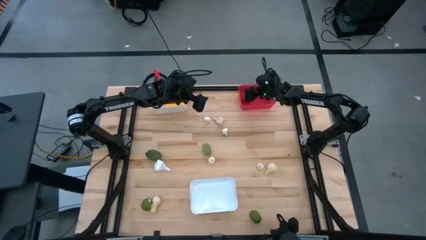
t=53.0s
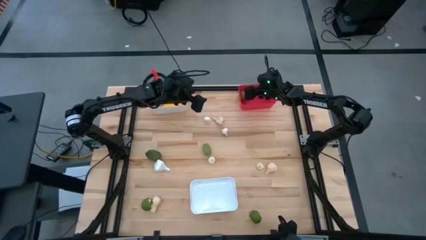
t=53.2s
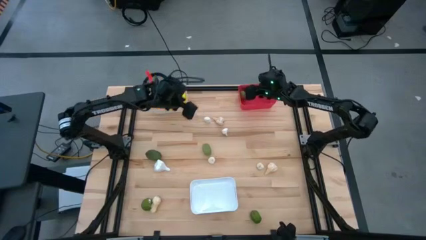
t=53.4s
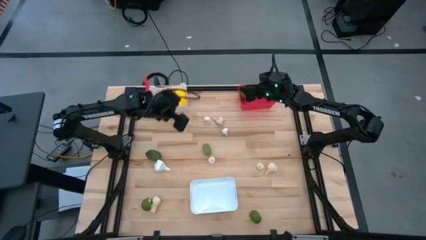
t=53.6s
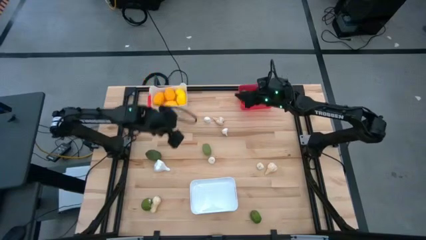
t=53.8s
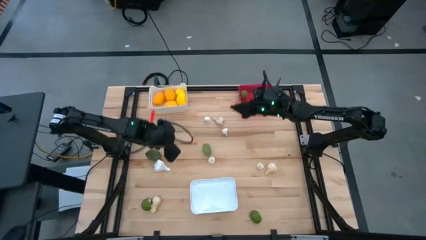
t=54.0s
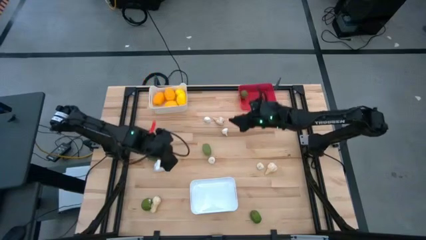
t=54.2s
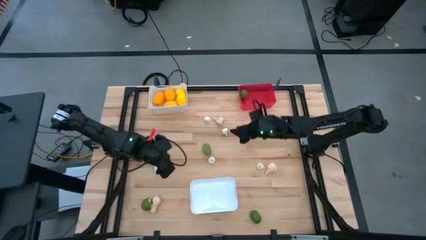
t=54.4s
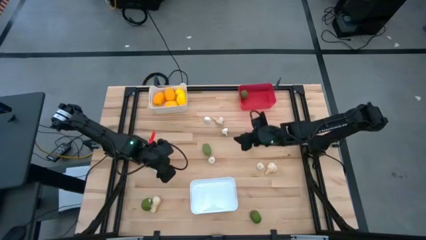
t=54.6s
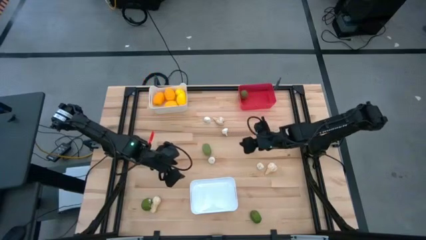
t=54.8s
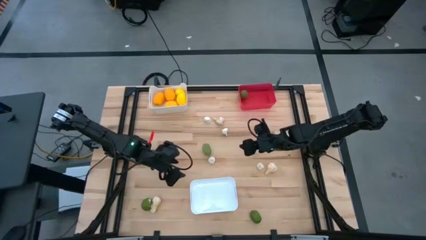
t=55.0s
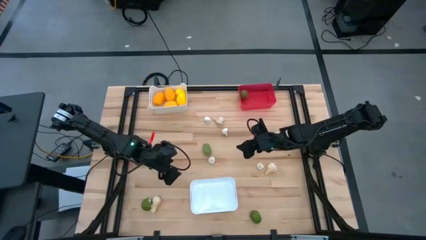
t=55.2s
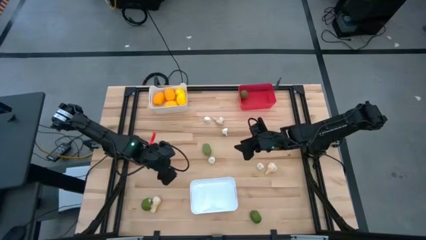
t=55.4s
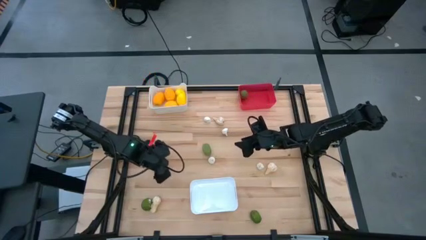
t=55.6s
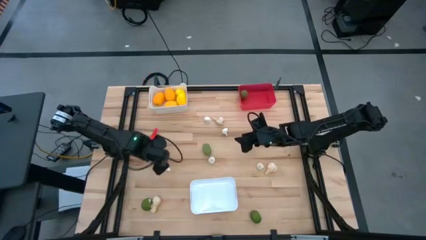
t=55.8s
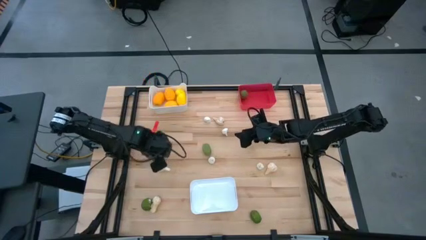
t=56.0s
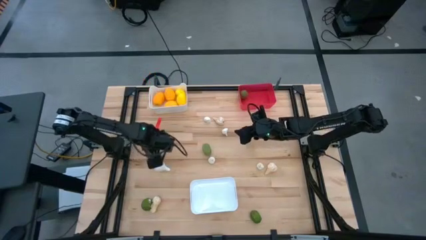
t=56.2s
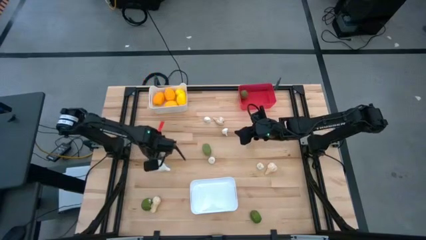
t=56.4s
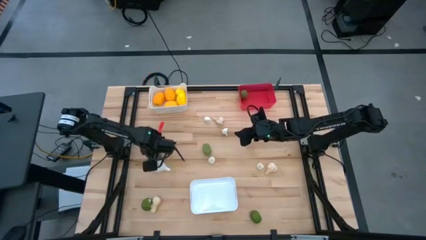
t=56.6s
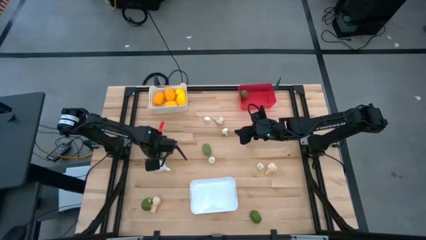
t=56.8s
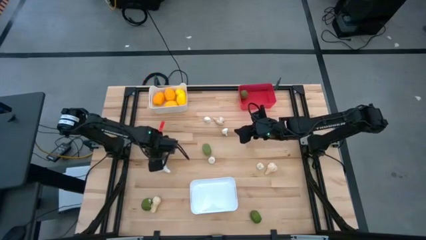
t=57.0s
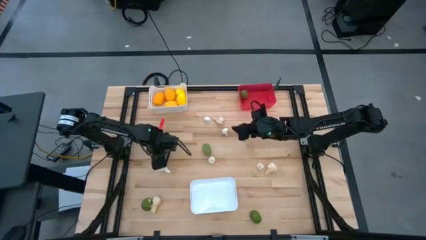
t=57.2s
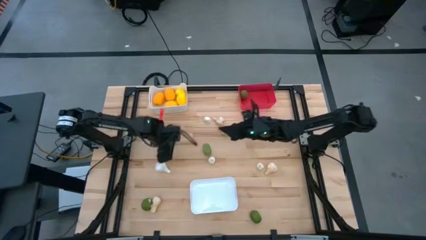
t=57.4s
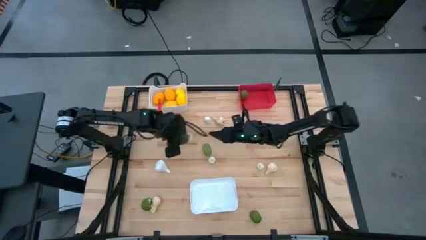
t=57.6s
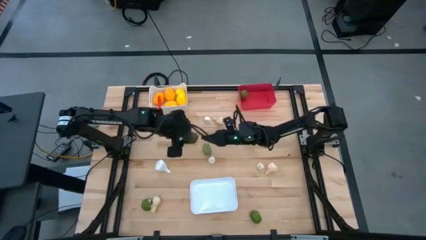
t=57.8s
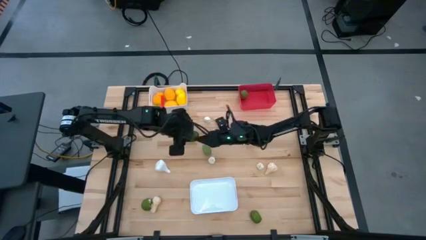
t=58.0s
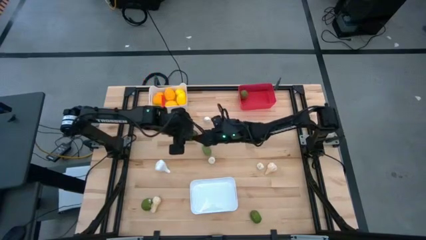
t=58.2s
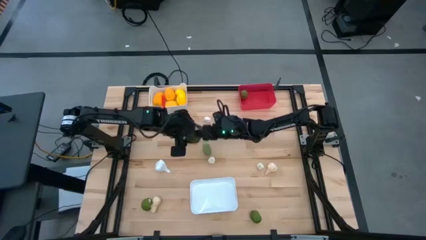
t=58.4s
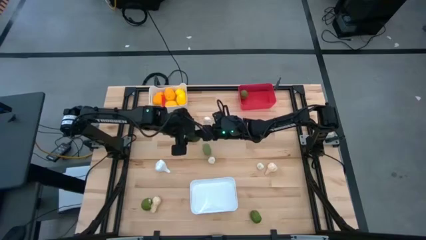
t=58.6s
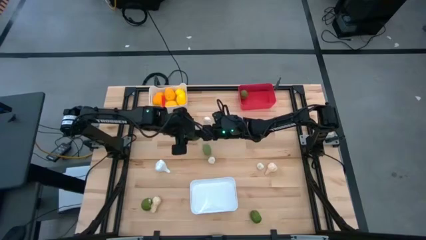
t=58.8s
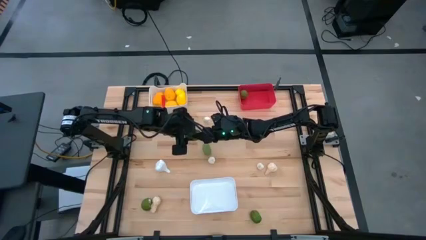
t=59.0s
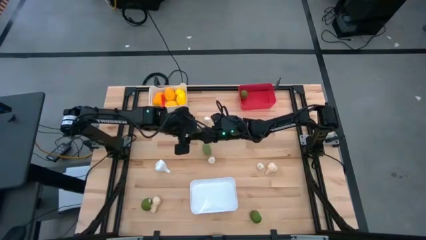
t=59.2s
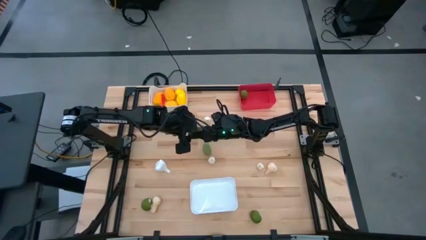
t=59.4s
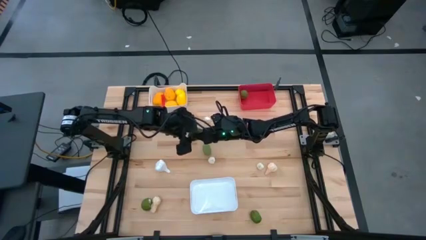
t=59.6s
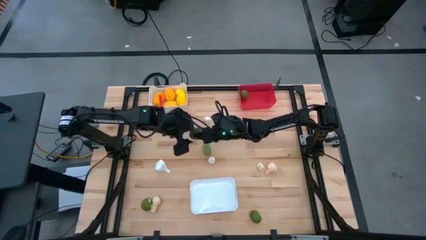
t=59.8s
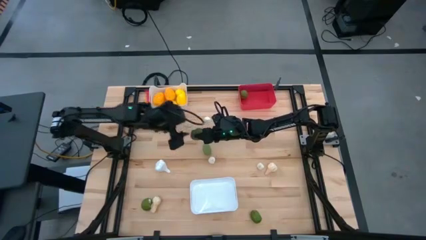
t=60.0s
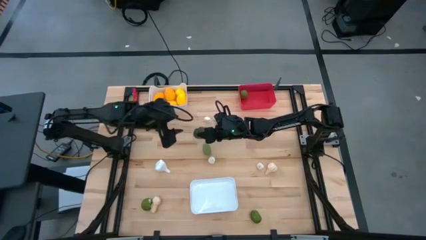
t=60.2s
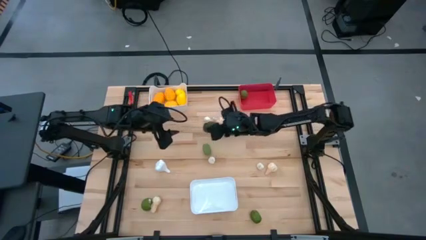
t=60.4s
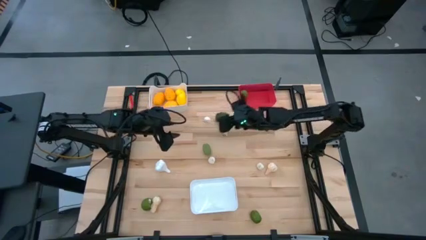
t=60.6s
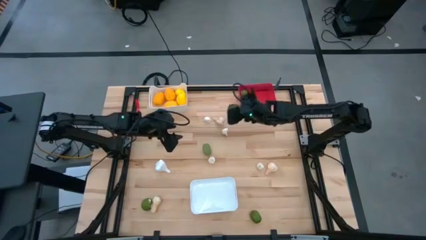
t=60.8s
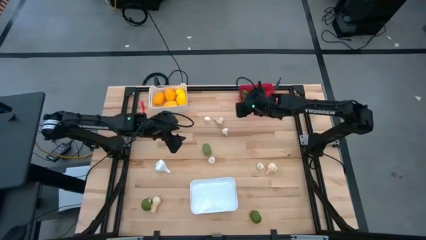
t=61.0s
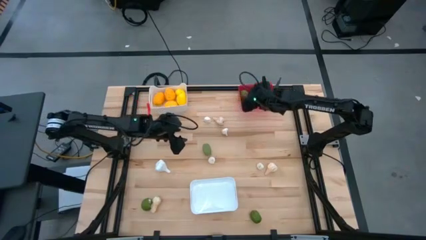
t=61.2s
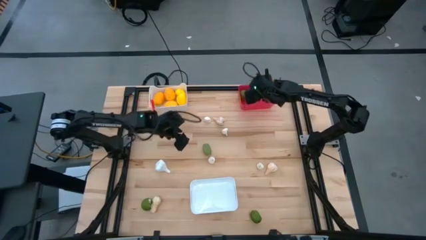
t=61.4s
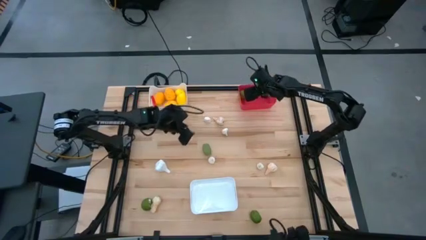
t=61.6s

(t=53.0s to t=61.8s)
Task: Sort produce into baskets
Put the green lime into the red bin

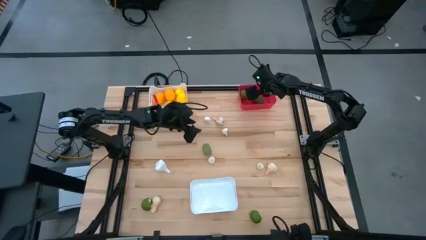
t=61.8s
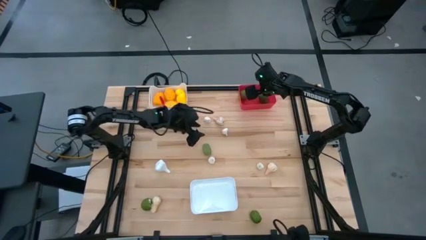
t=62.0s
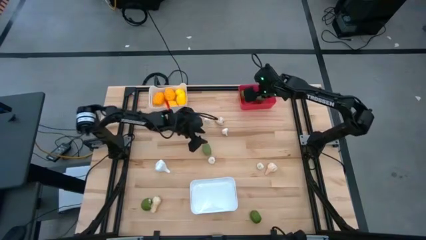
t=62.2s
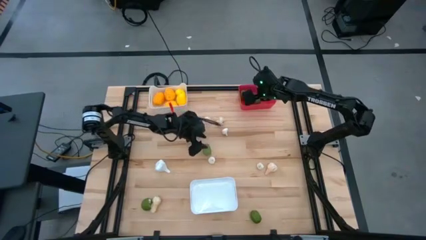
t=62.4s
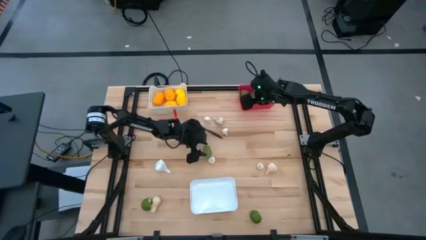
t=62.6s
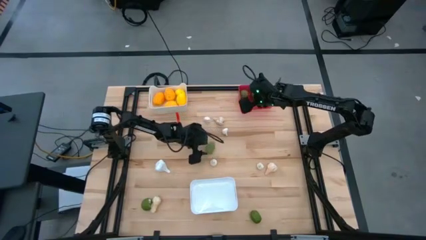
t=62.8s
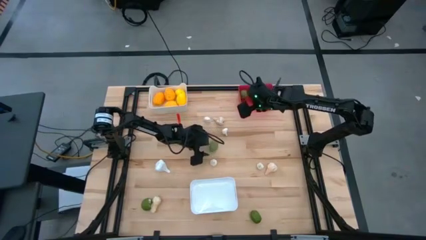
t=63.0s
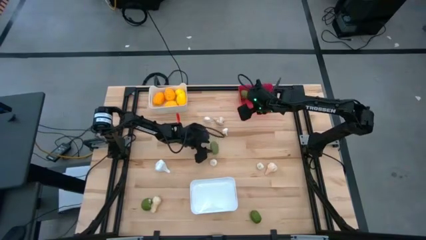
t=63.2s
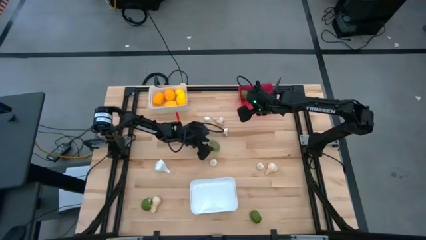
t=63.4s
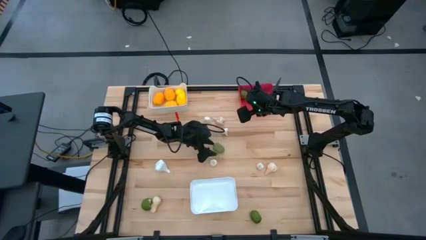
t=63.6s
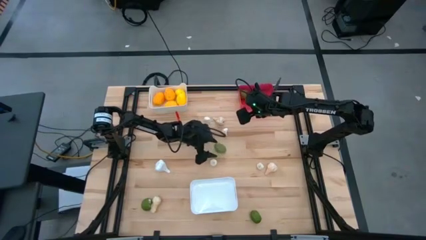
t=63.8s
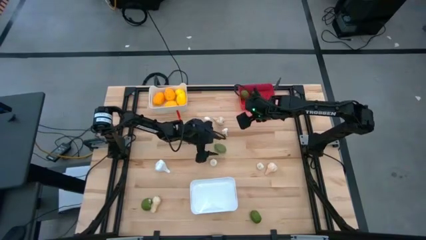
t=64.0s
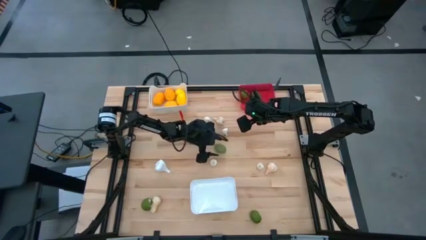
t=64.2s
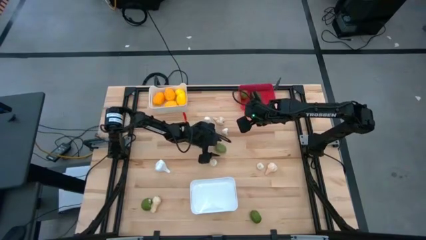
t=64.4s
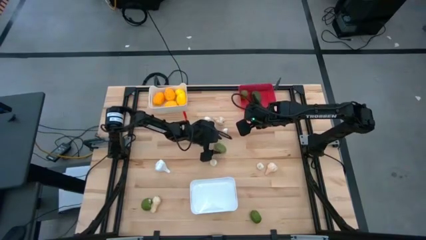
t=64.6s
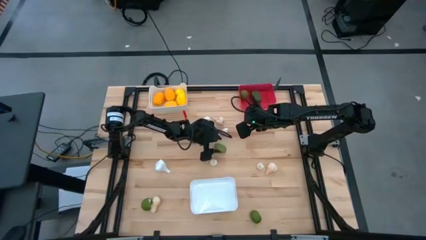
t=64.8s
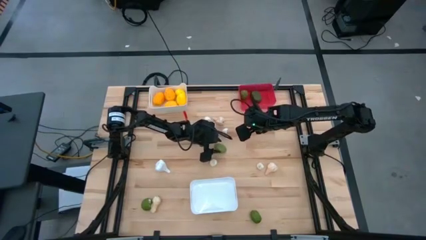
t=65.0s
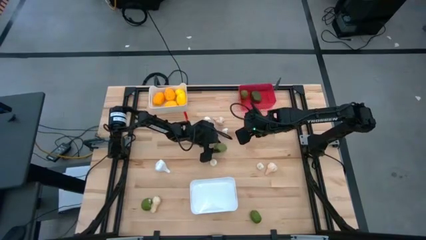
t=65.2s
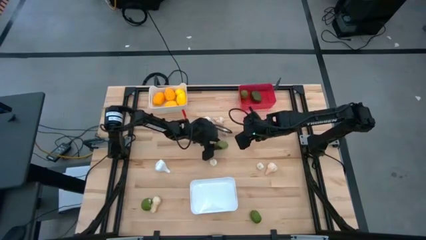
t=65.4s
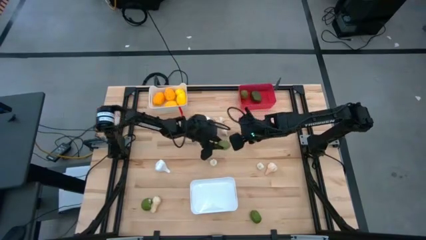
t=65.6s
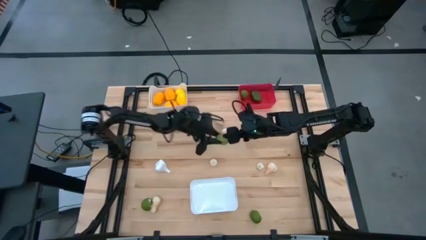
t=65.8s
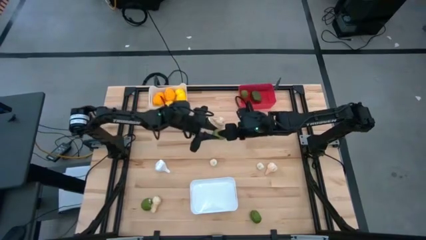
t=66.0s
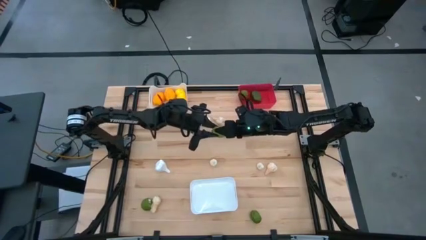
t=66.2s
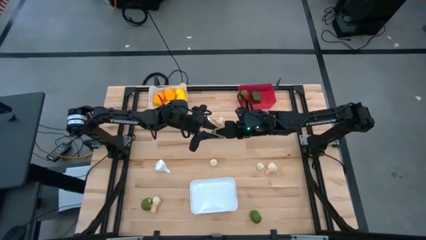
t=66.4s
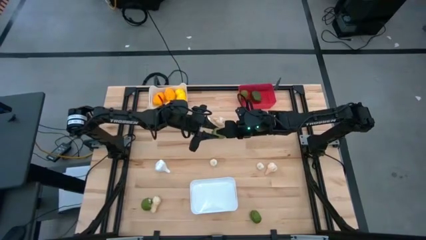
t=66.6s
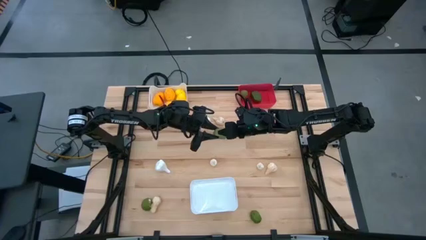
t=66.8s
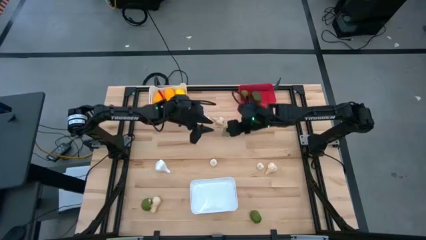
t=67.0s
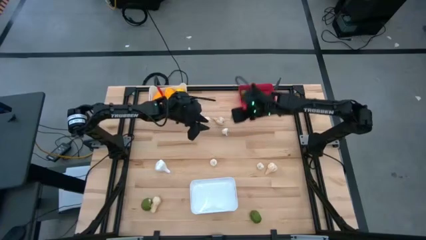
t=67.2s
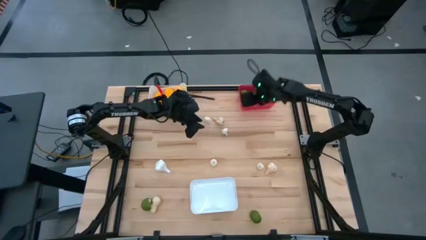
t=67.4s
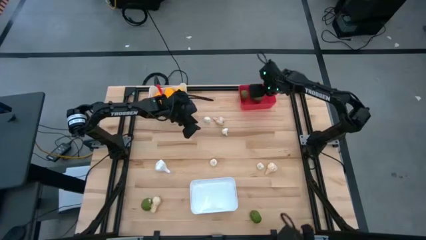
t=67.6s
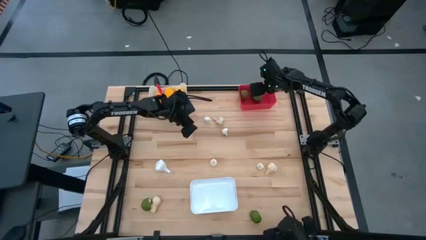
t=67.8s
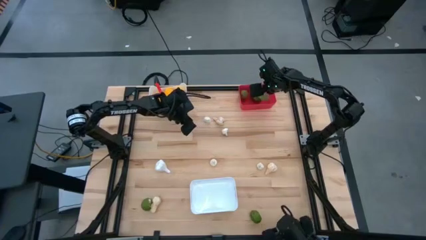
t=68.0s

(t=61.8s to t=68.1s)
Put the green lime into the red bin

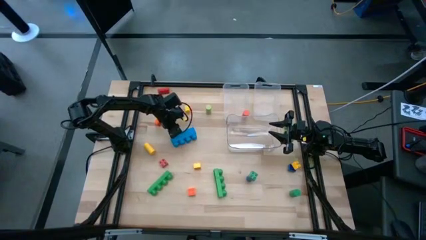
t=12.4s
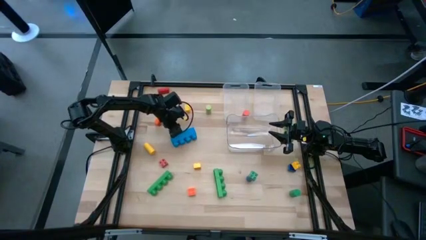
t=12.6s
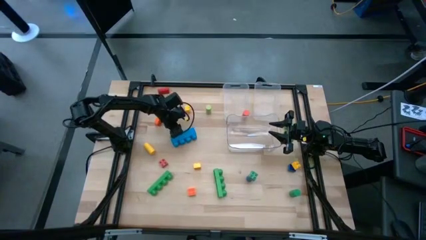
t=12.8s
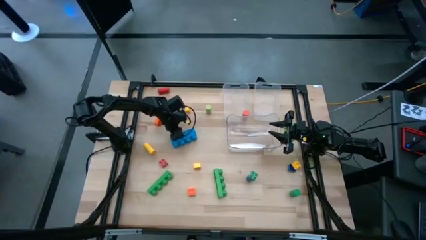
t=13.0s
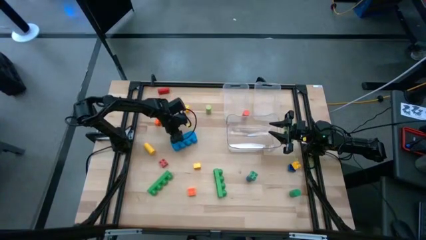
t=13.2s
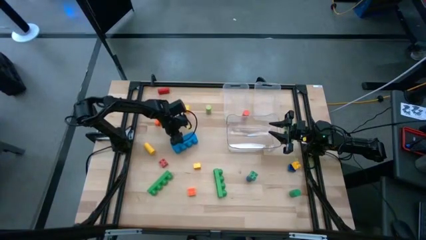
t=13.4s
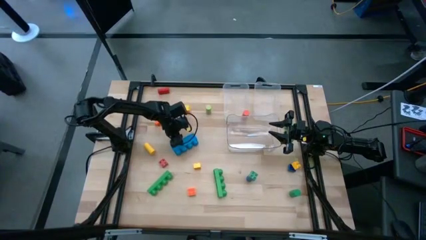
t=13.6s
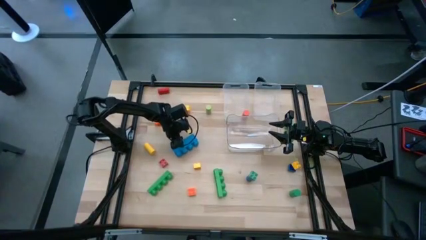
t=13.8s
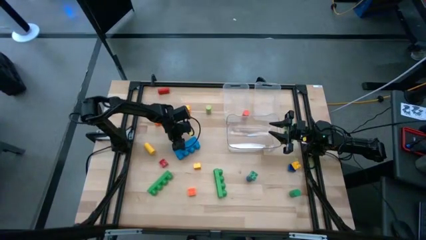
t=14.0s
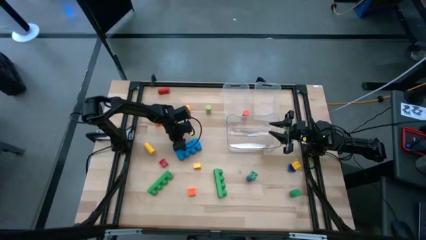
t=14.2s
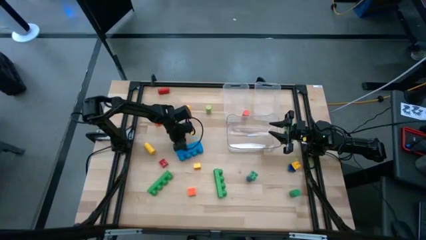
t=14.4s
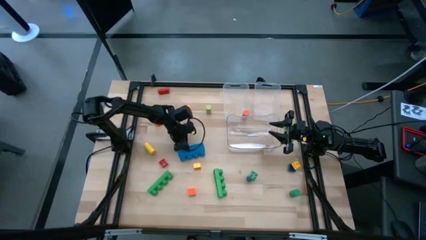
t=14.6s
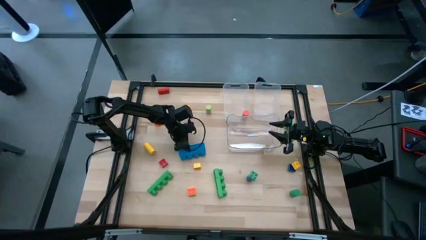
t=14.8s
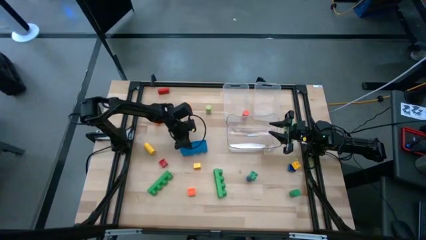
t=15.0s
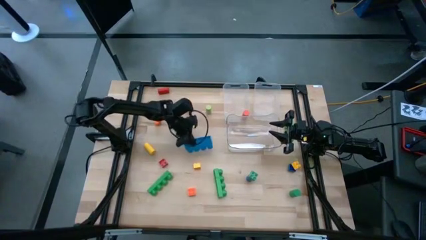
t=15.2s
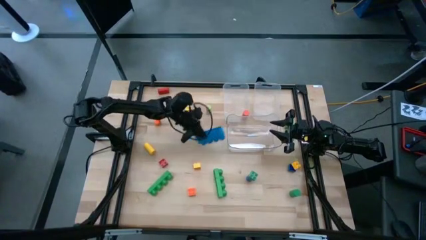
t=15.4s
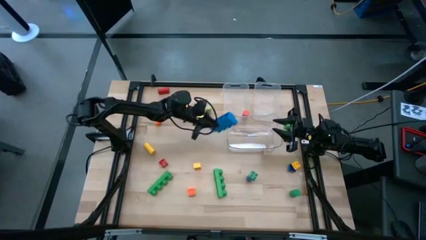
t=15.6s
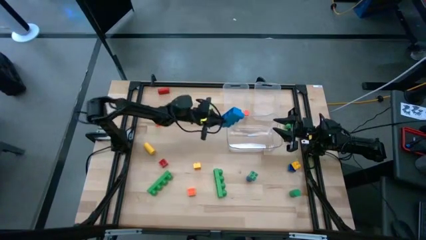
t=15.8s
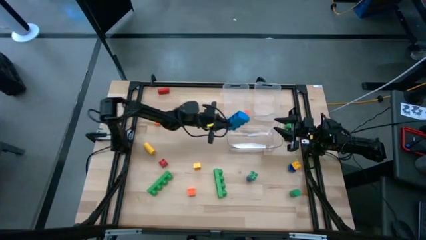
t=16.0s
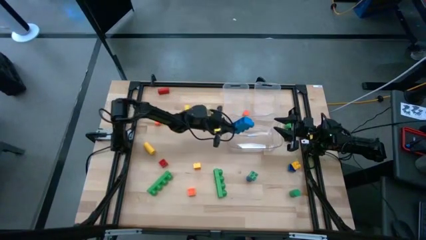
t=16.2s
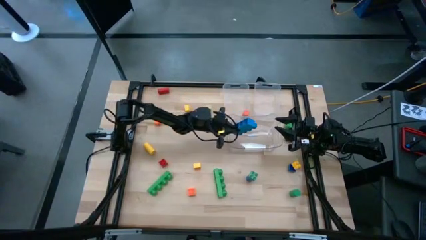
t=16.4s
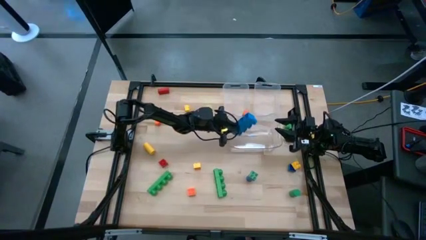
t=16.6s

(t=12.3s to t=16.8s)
Task: Sort blocks by size
Put the large blue 4 stud game piece into the bottom transparent bin
